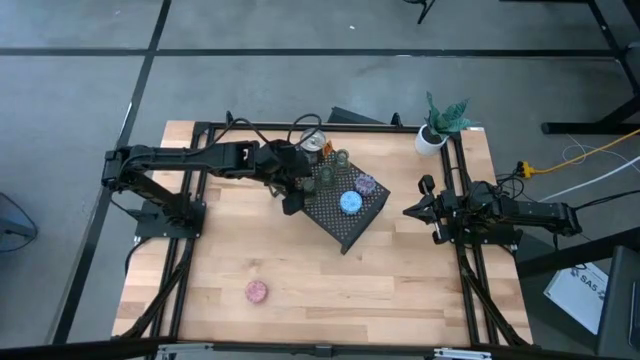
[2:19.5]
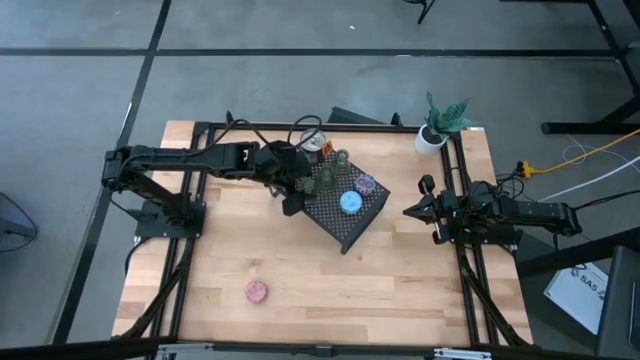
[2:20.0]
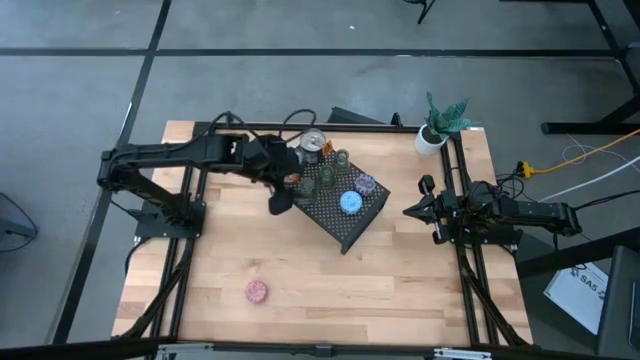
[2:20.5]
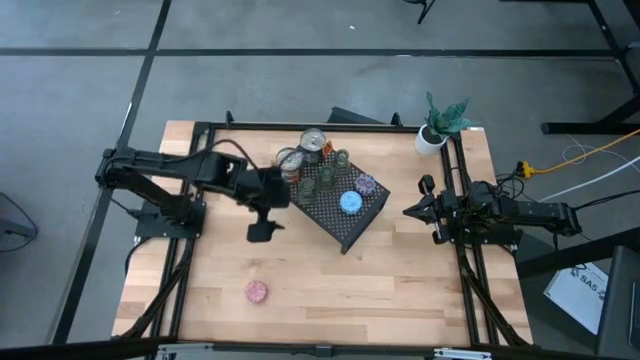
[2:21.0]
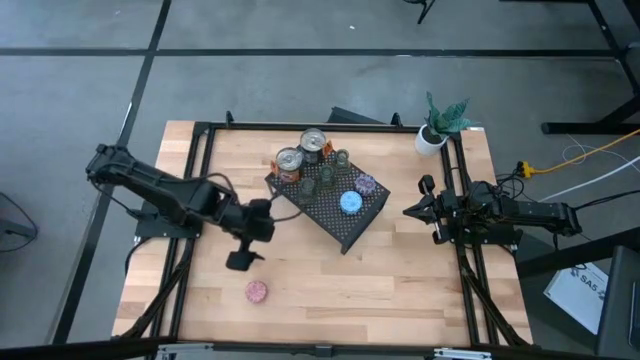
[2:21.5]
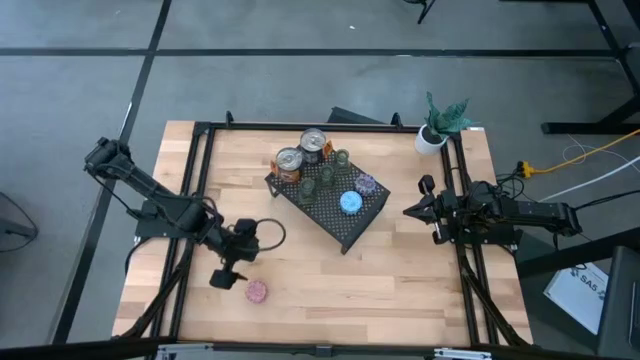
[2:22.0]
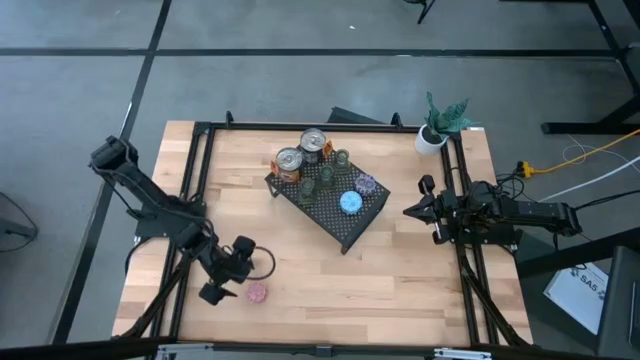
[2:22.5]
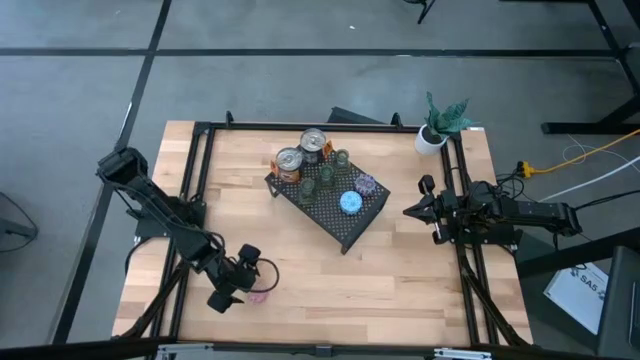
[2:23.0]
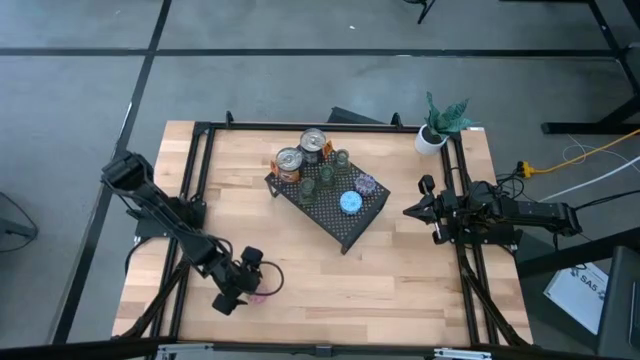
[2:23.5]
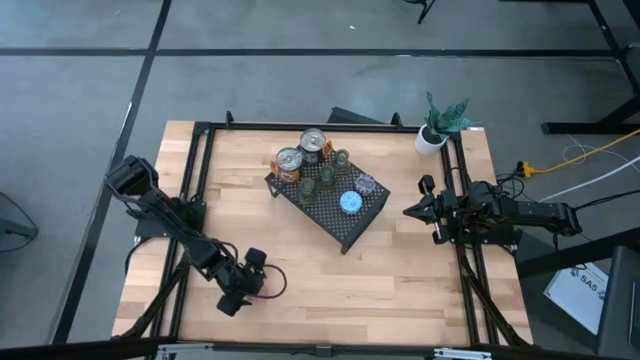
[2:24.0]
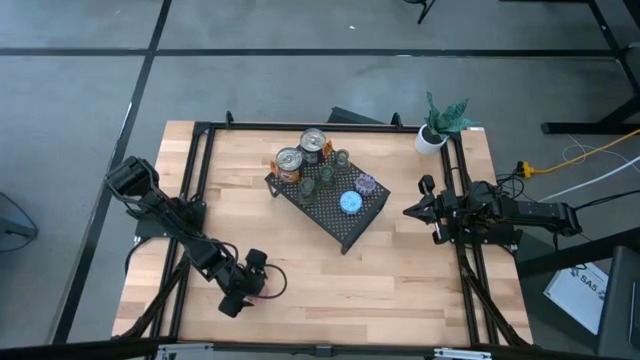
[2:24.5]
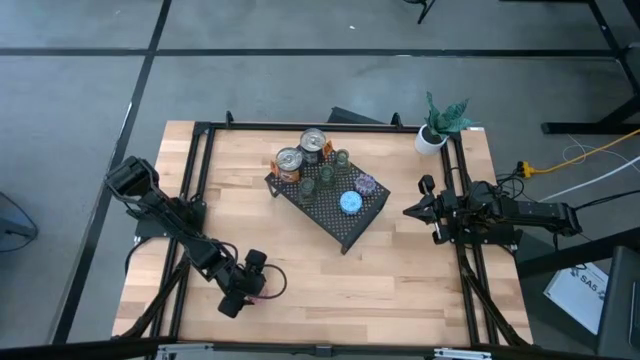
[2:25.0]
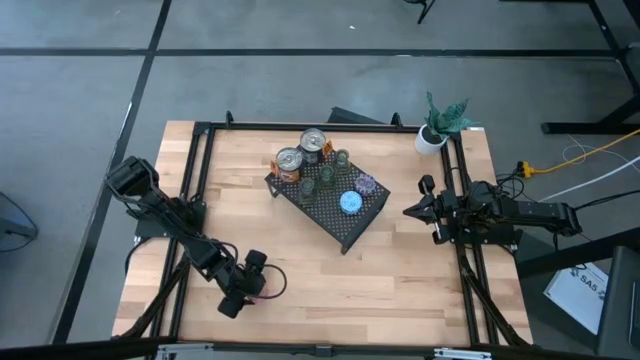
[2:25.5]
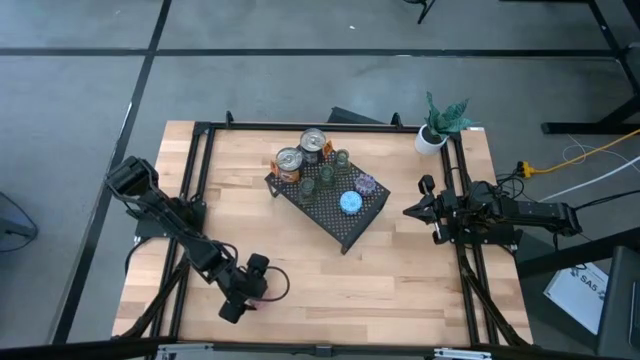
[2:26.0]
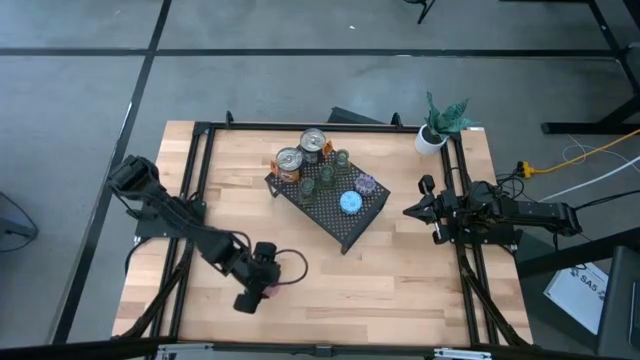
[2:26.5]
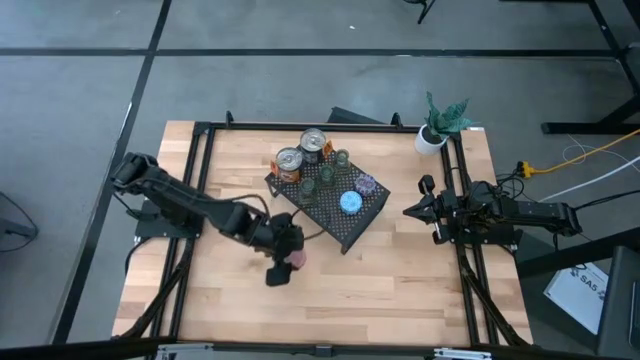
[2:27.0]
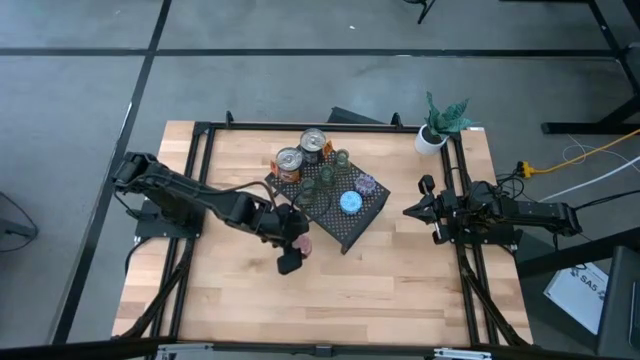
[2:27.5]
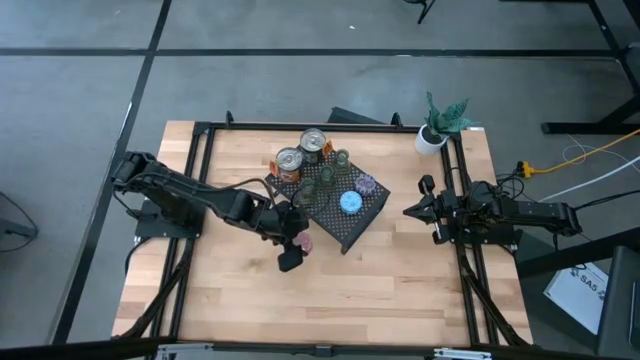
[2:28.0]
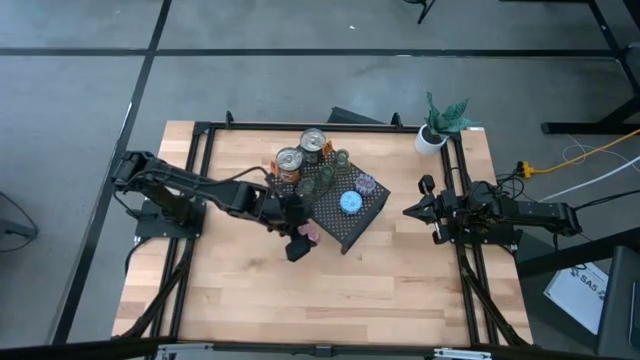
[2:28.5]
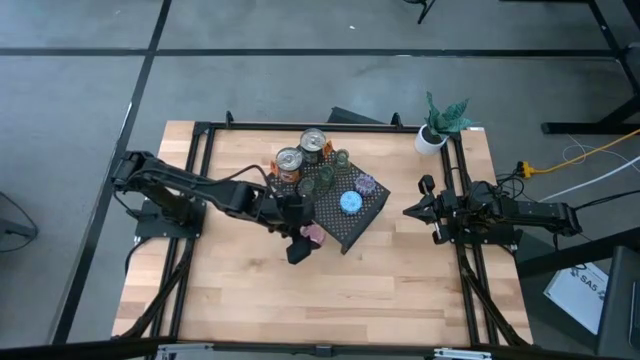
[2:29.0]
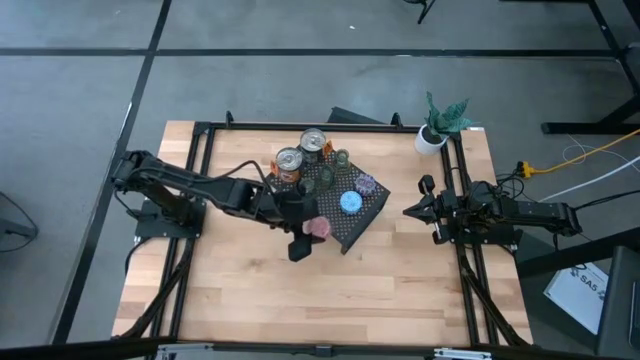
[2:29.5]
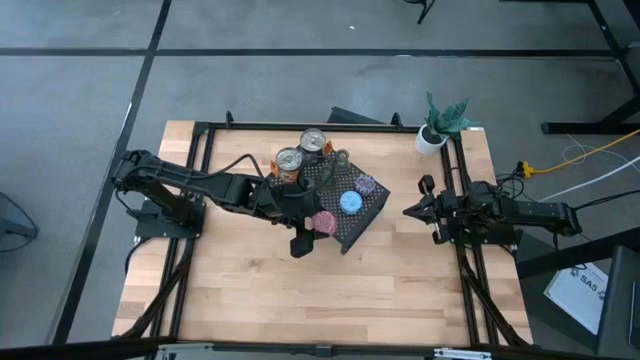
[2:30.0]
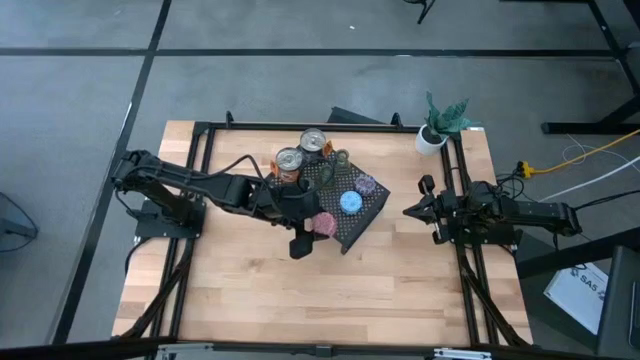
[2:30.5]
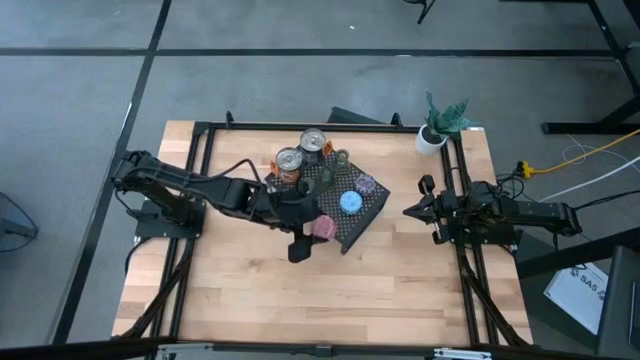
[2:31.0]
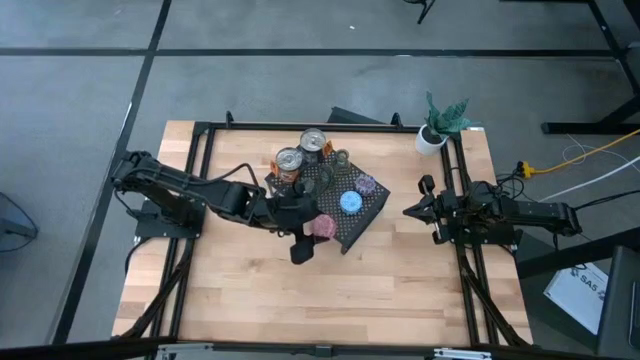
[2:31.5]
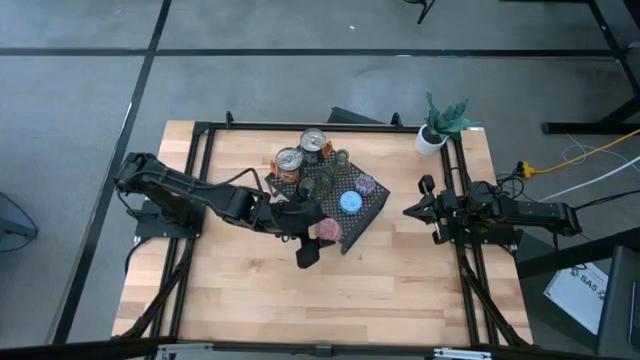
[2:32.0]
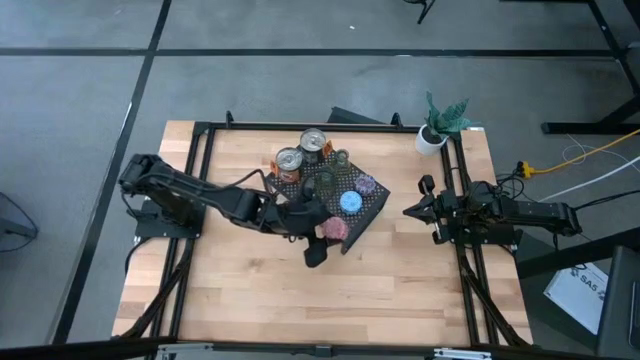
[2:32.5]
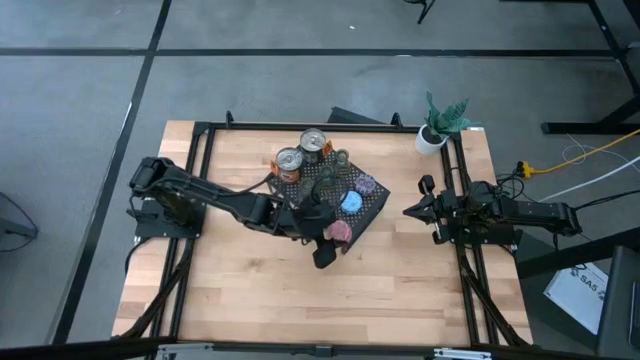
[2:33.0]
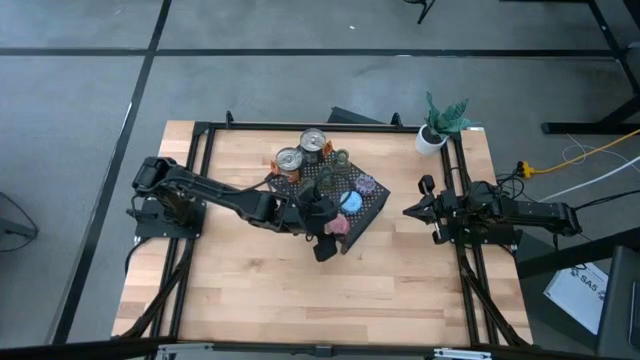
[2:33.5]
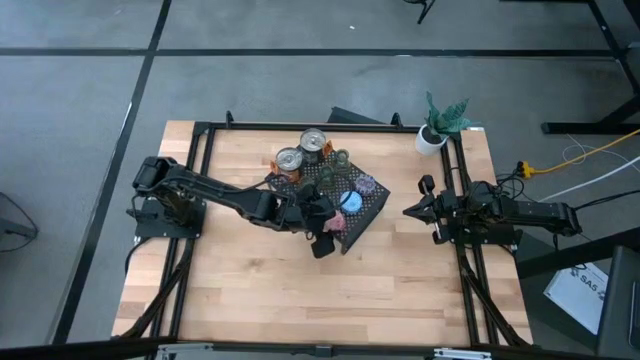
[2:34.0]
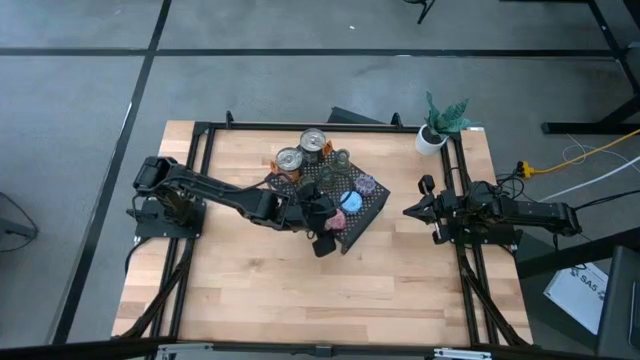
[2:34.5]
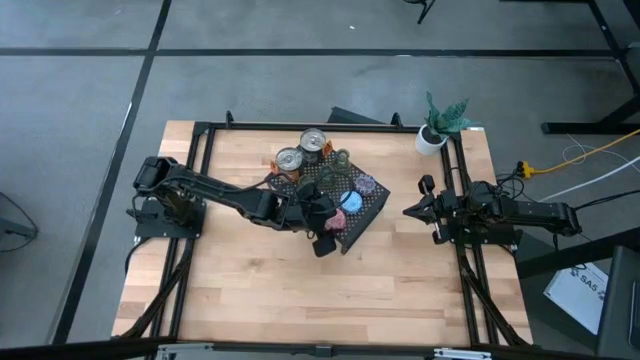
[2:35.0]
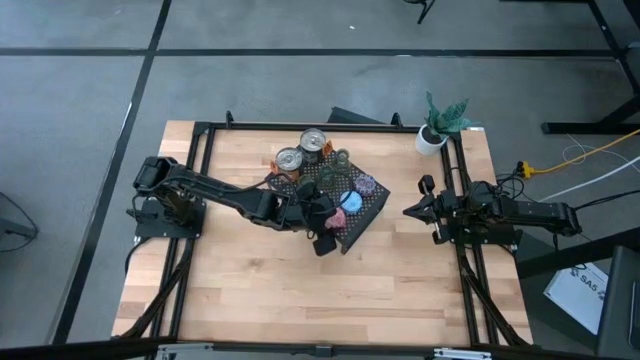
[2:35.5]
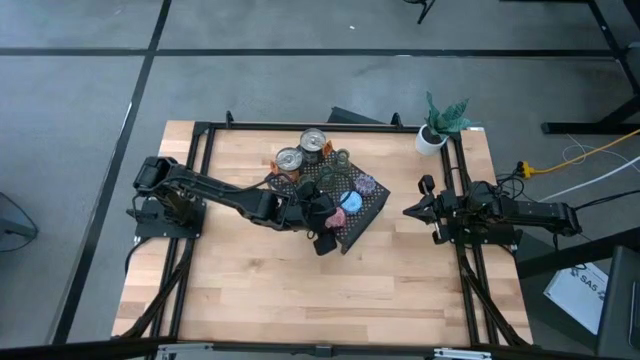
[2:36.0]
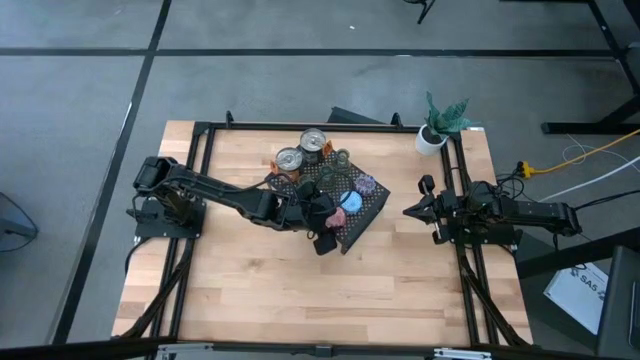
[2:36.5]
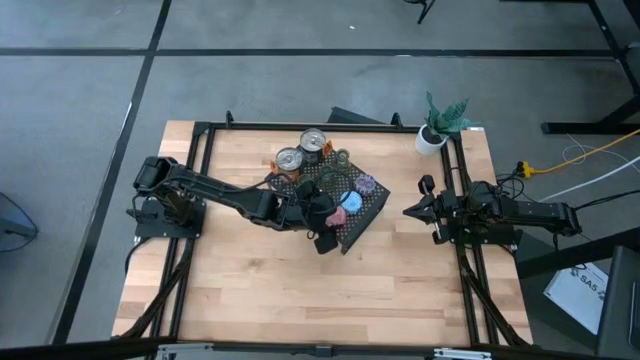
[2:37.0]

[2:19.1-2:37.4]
Task: Pick & Place candle stick holders
Put the red scented candle on the shelf
